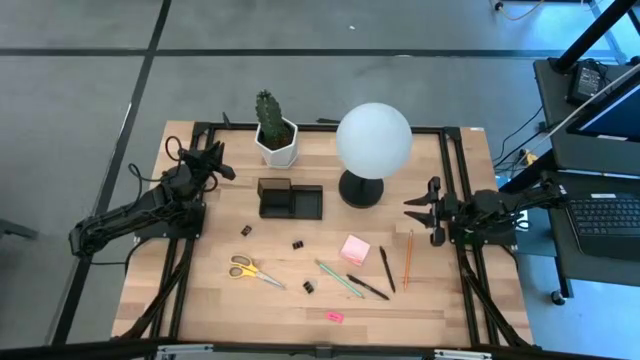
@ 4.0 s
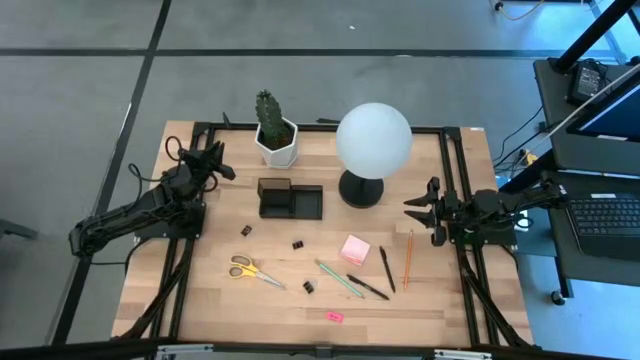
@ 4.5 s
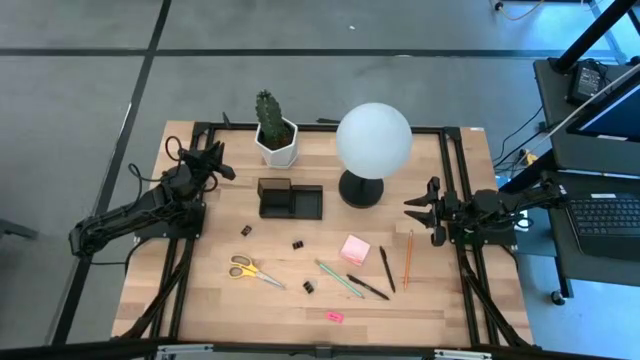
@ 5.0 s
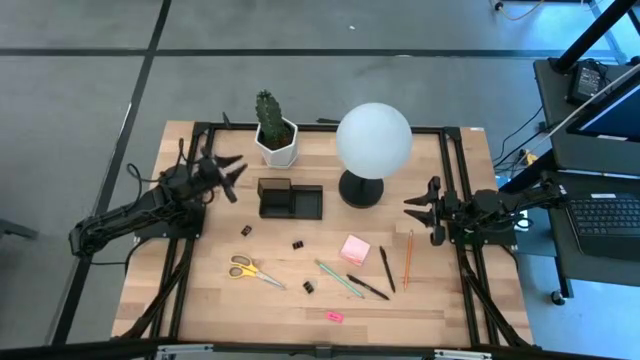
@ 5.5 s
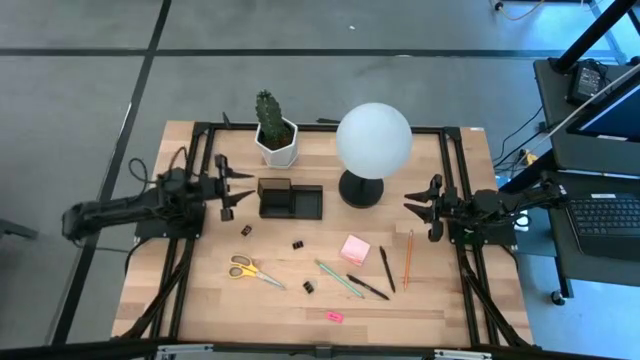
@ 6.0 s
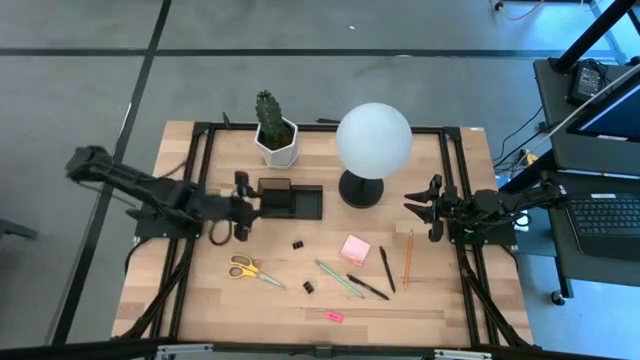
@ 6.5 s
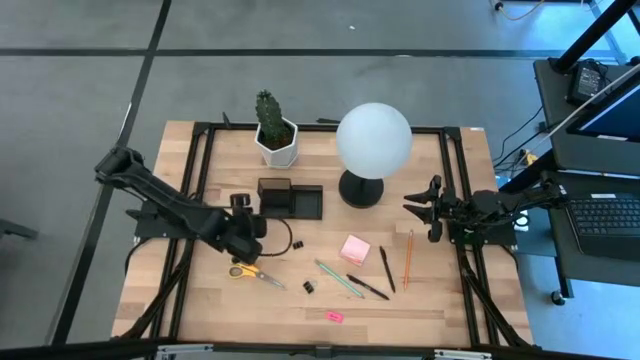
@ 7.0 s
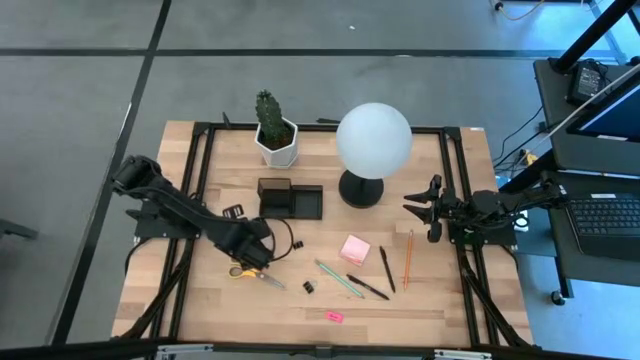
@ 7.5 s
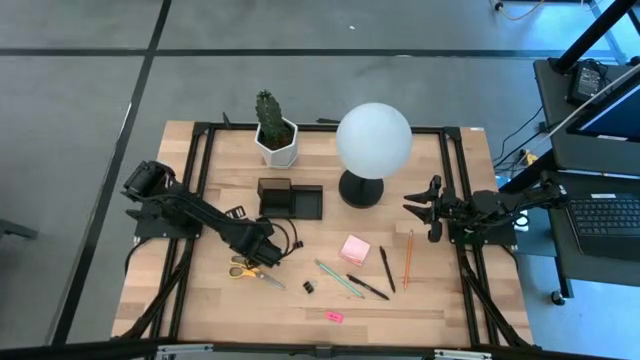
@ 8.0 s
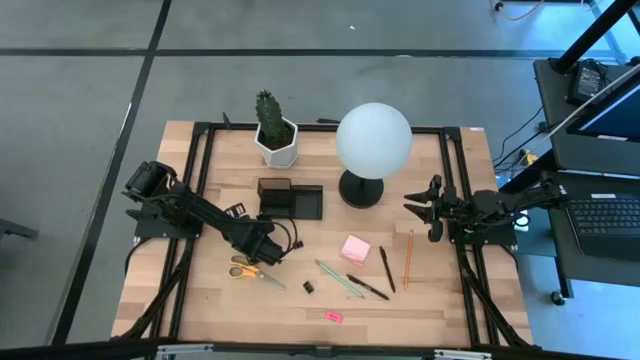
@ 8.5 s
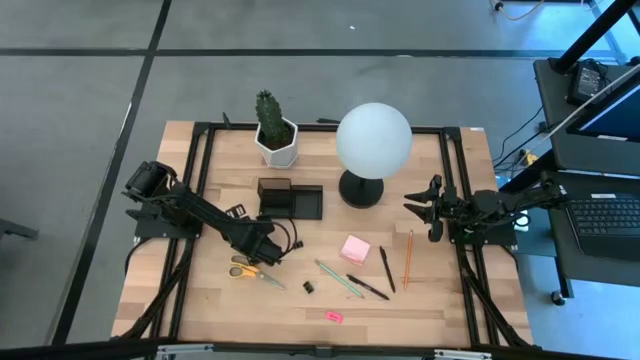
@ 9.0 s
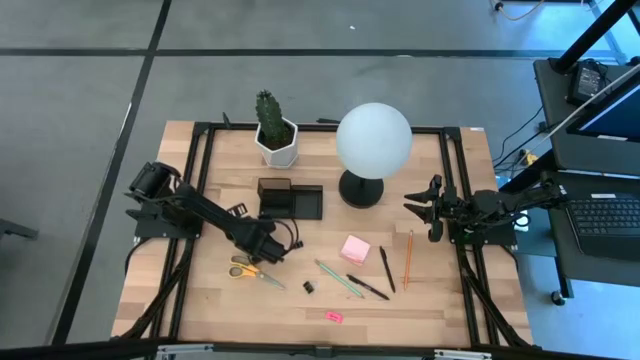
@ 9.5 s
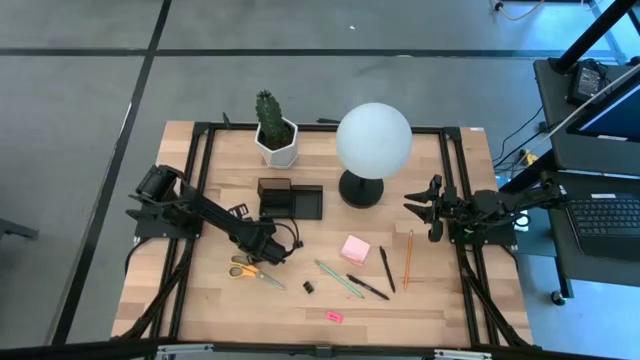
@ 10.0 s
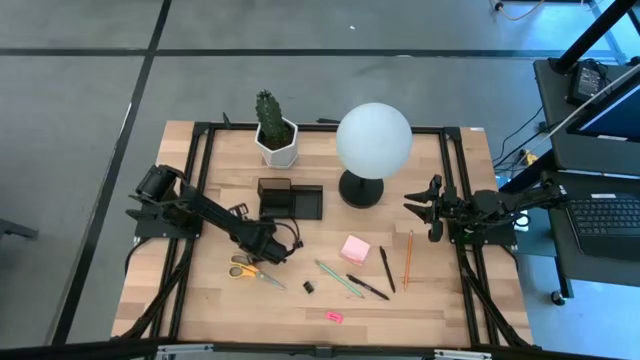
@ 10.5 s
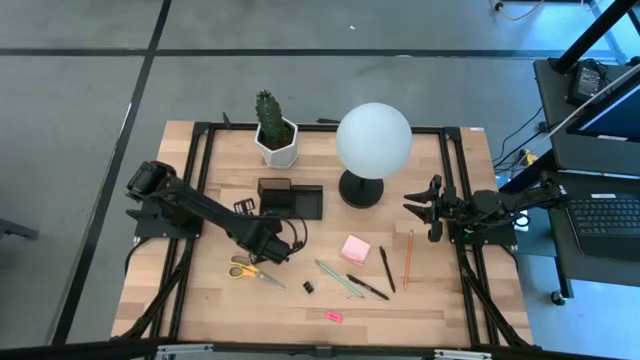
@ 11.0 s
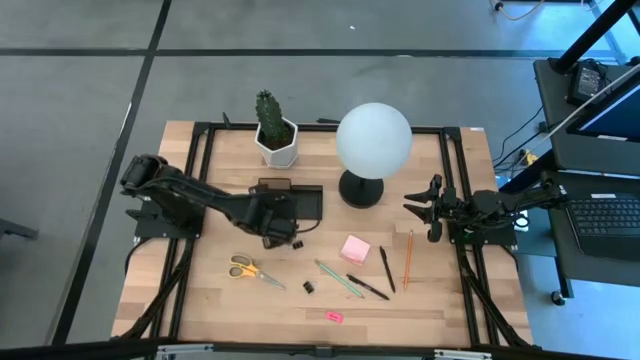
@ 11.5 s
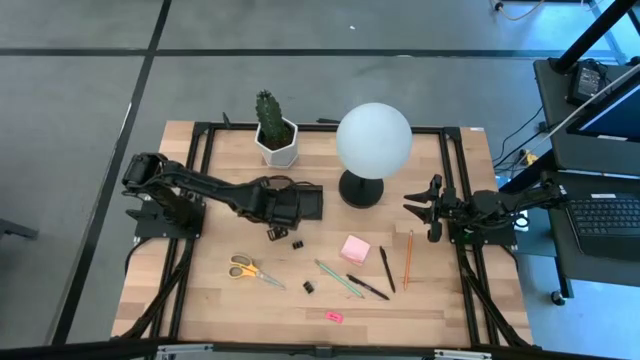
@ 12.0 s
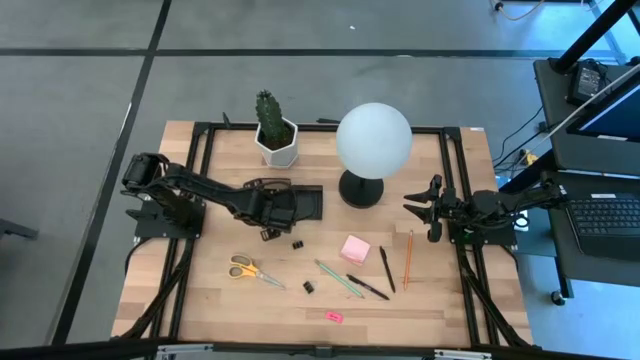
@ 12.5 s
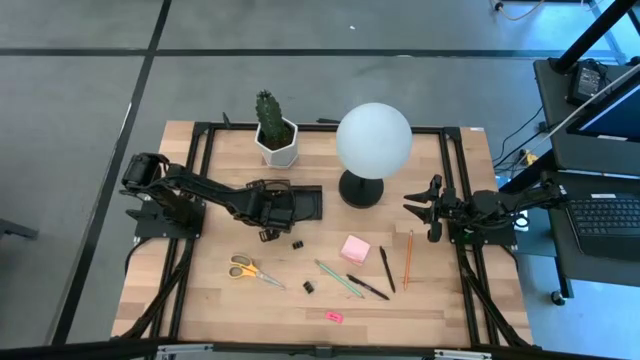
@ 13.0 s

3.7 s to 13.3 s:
Task: Pick and place office supplies into organizer
Put the top left black clip binder into the black desk organizer

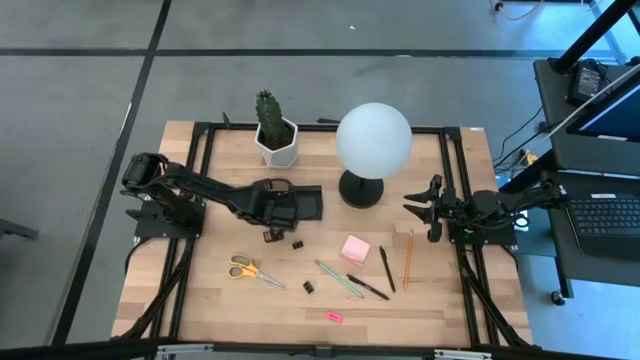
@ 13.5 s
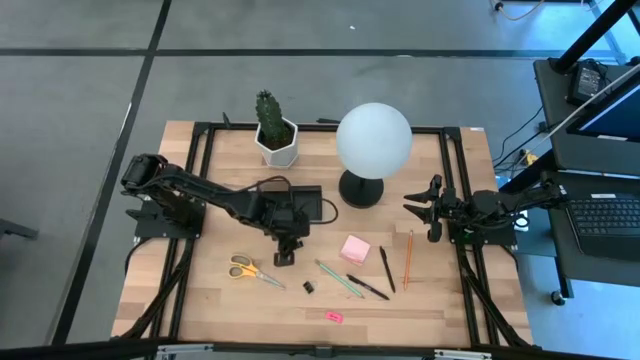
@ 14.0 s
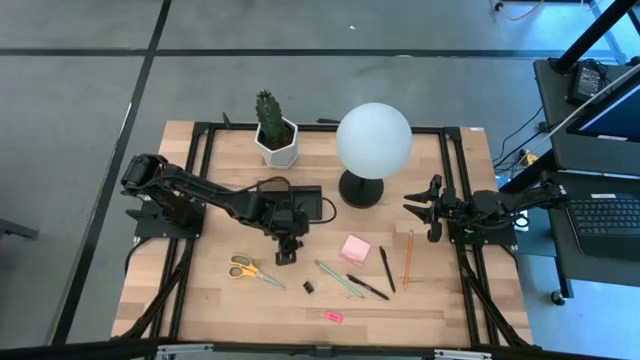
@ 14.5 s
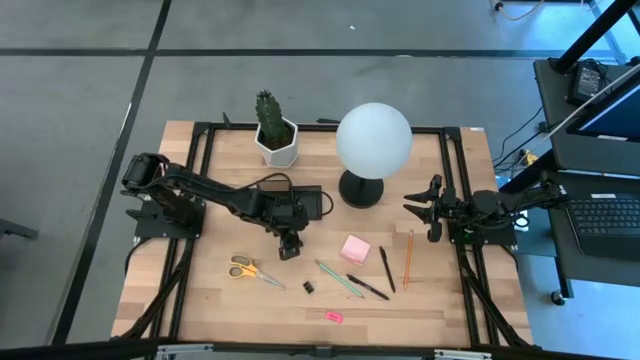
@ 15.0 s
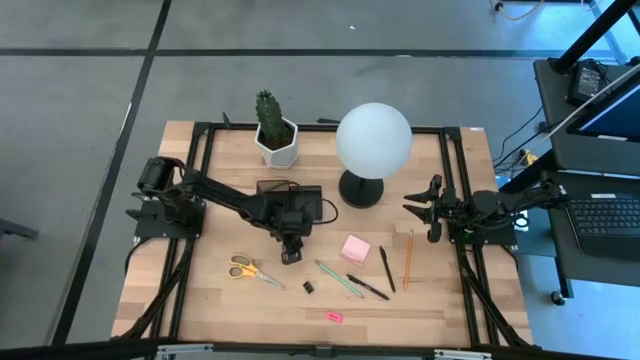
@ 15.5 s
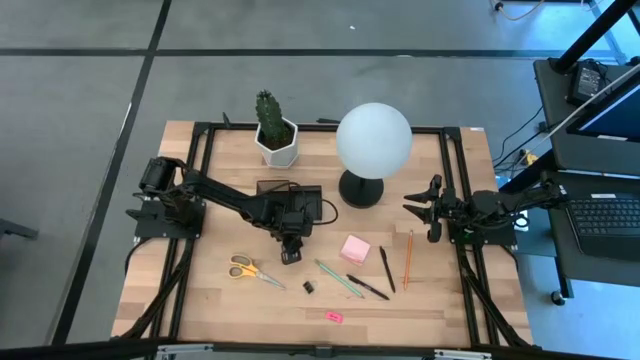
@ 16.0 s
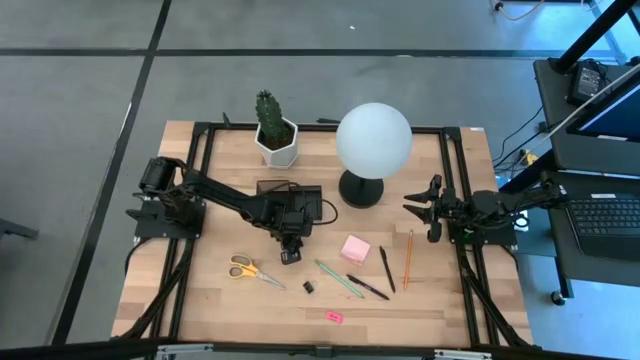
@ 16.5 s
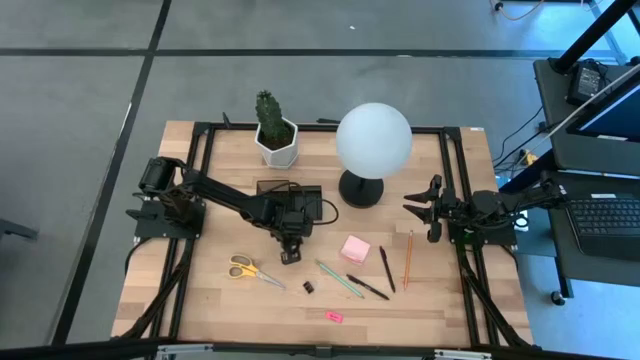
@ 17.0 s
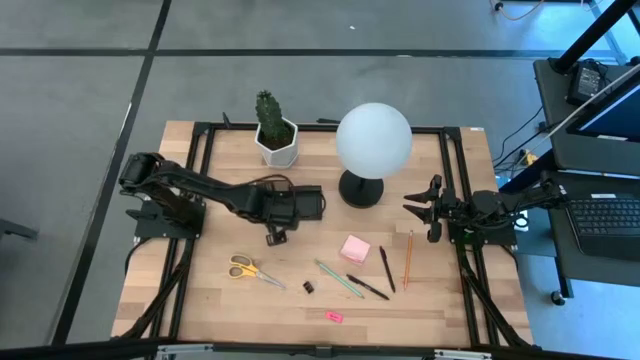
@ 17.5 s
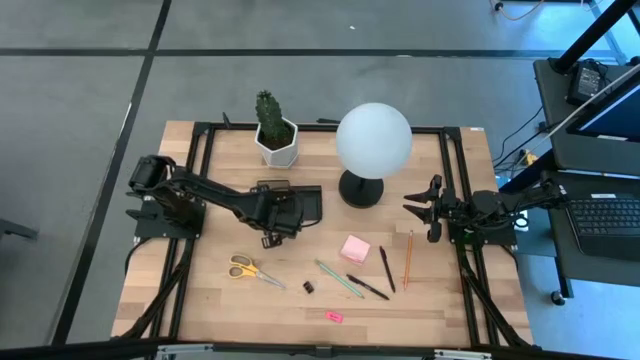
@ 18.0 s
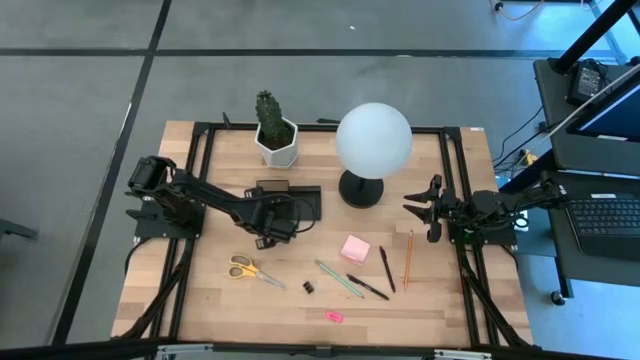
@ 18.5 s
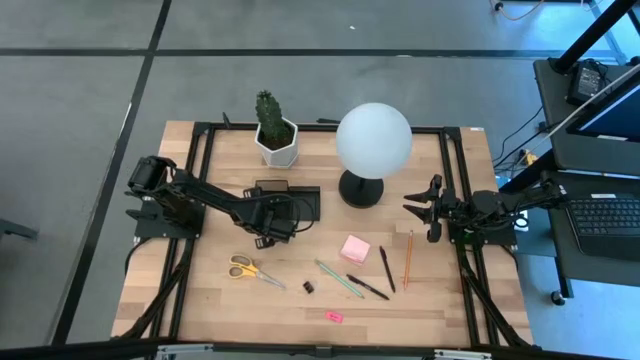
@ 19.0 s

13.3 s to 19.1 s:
Put the top black clip binder into the black desk organizer

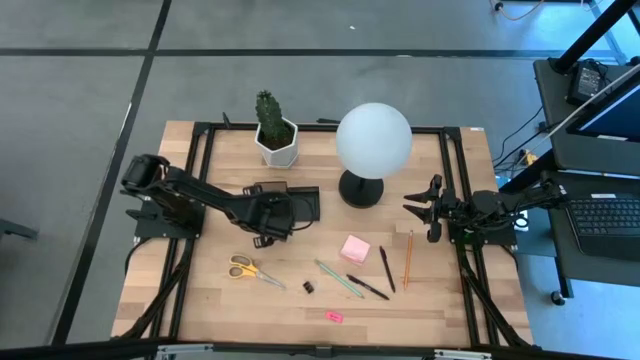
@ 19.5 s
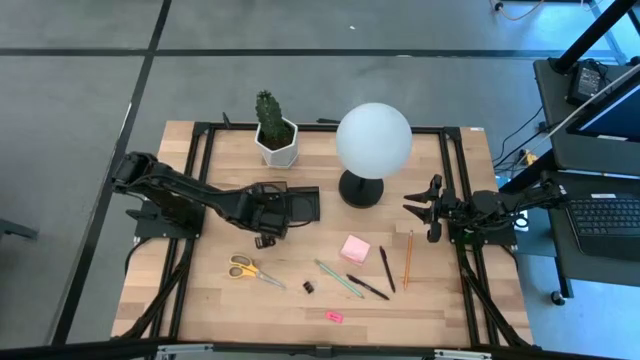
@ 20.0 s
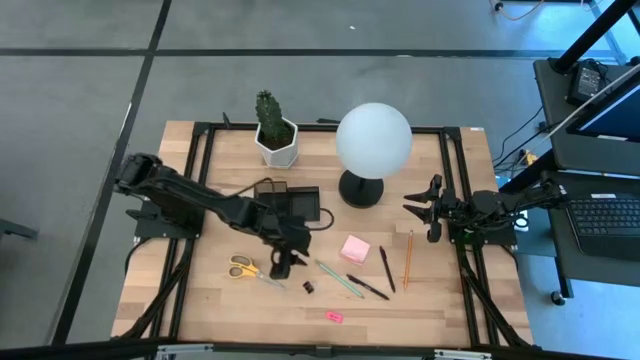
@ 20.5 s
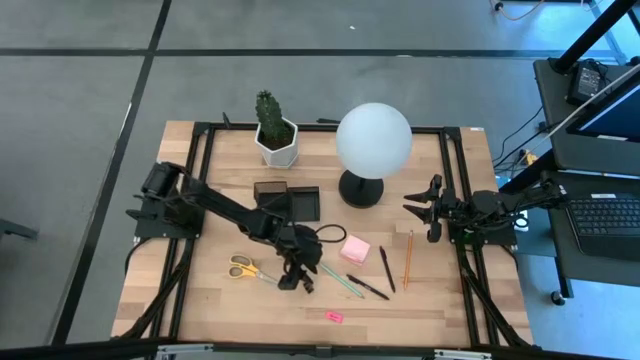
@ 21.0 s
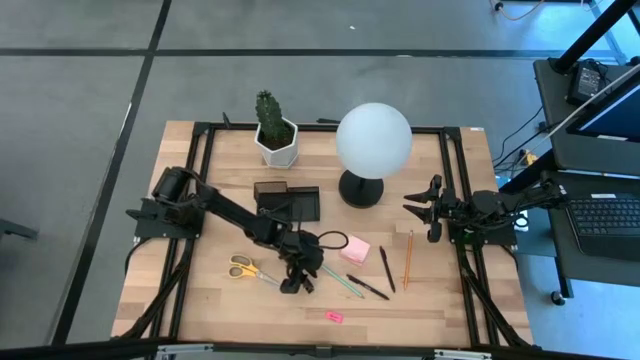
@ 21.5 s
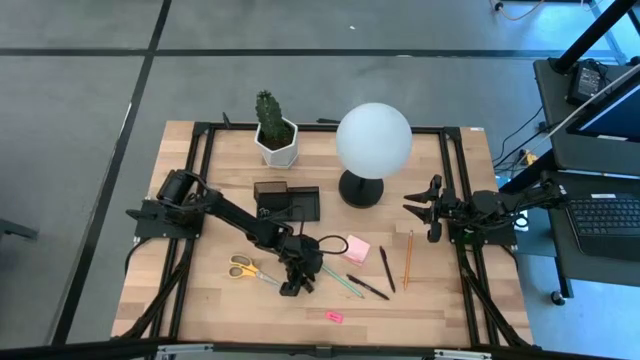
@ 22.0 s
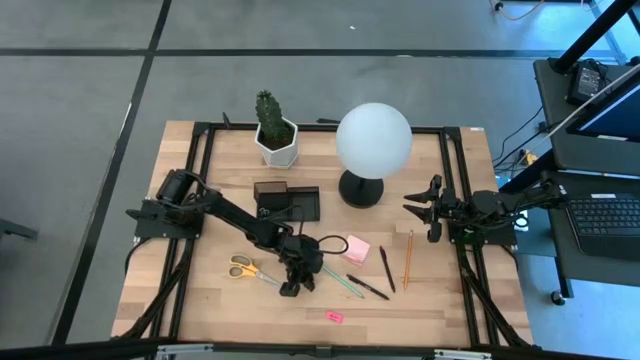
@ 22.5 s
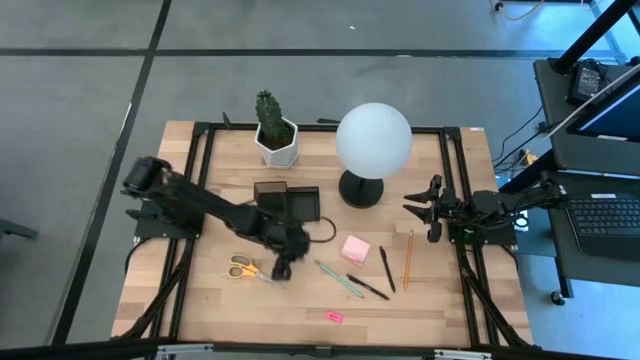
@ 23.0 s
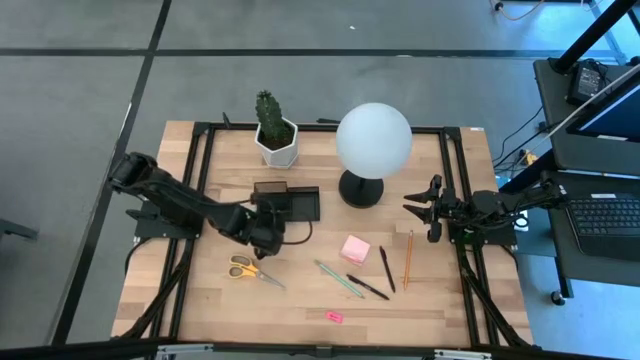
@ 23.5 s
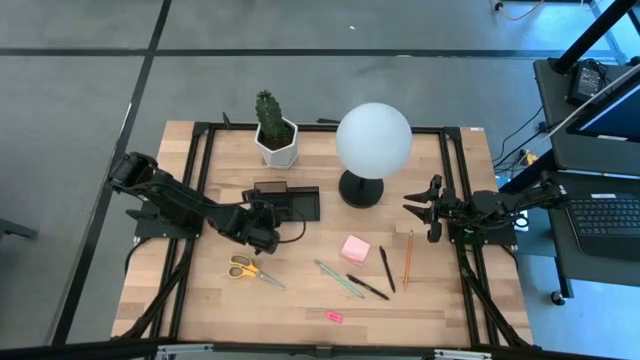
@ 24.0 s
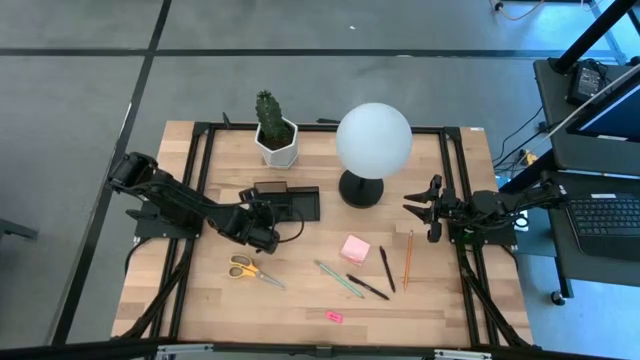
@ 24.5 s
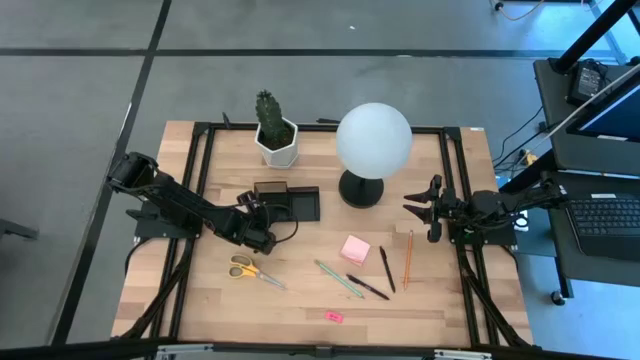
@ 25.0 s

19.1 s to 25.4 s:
Put the black clip binder into the black desk organizer
